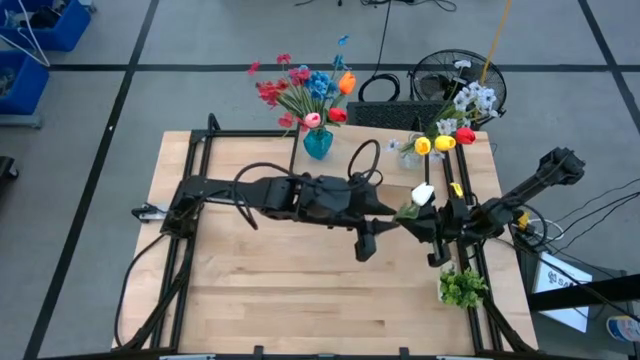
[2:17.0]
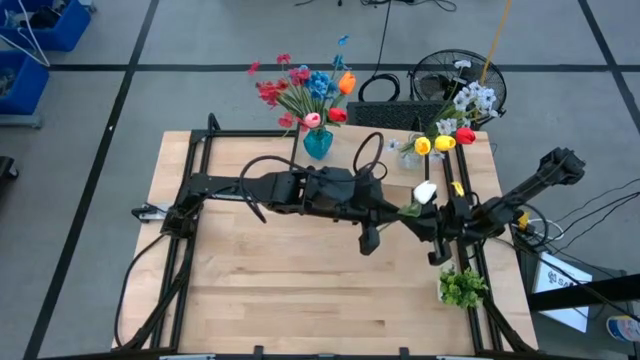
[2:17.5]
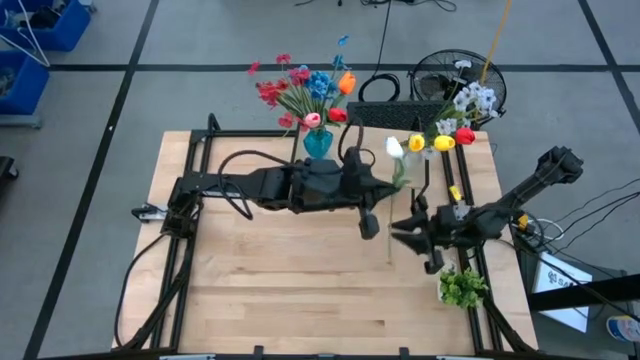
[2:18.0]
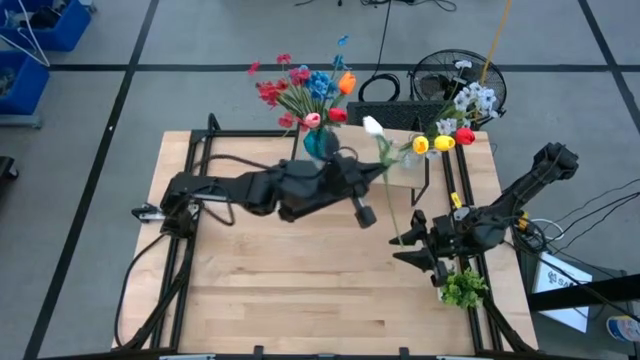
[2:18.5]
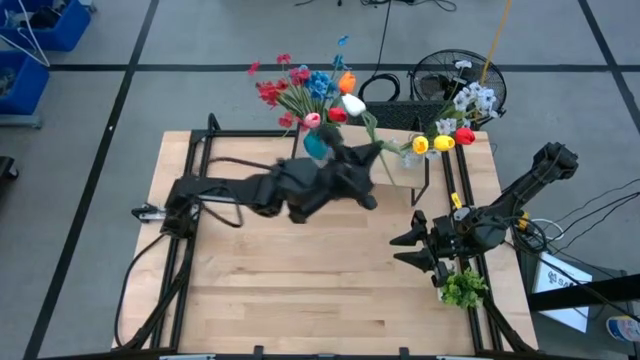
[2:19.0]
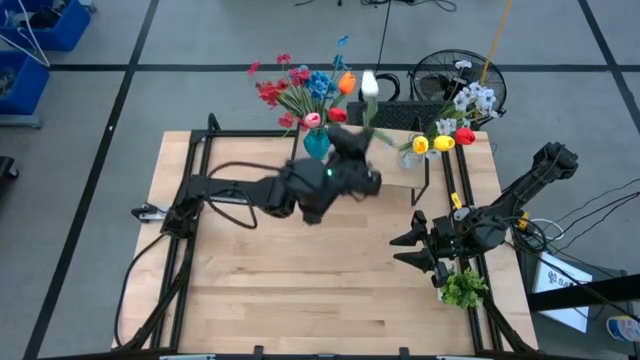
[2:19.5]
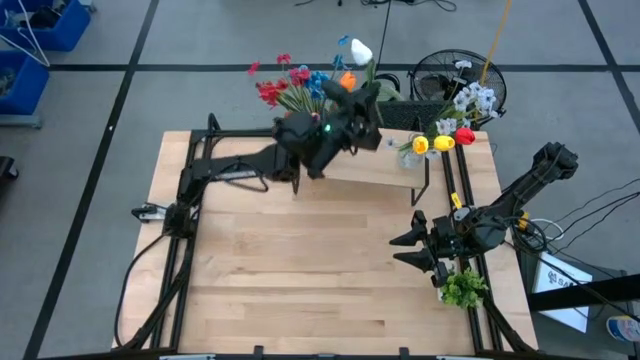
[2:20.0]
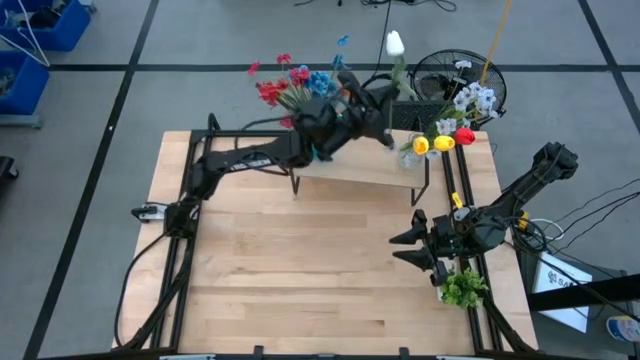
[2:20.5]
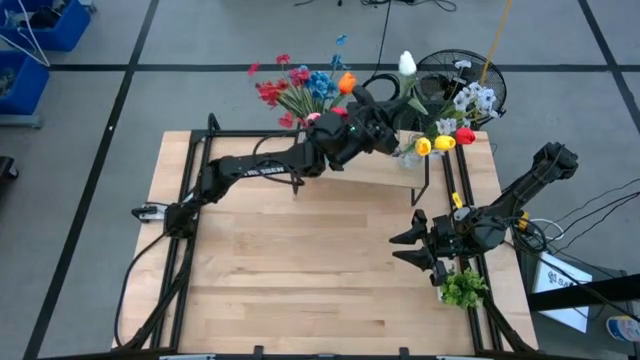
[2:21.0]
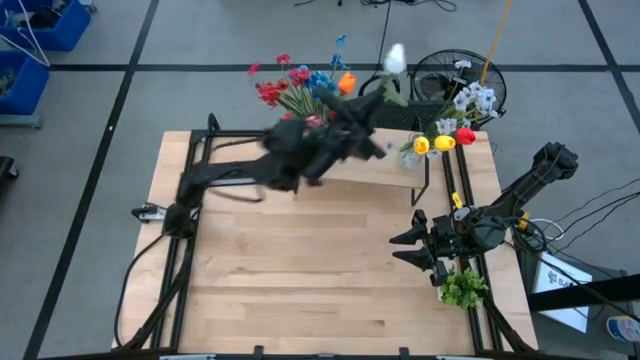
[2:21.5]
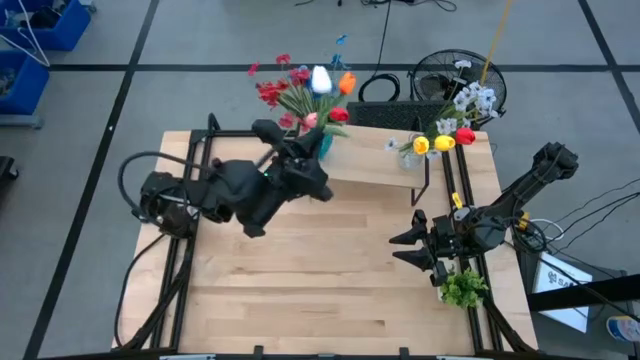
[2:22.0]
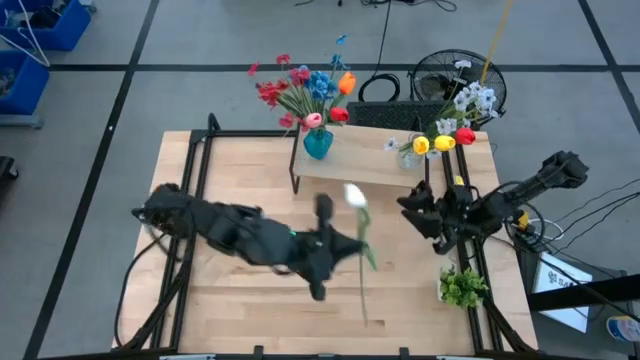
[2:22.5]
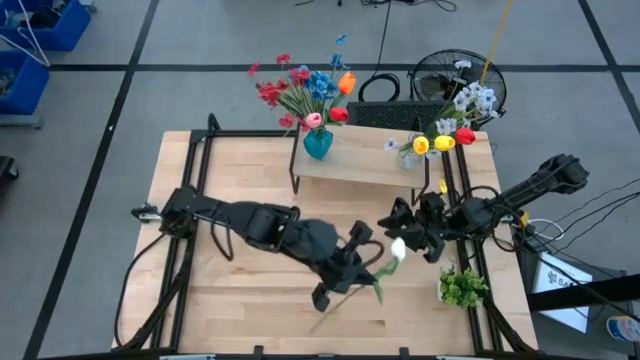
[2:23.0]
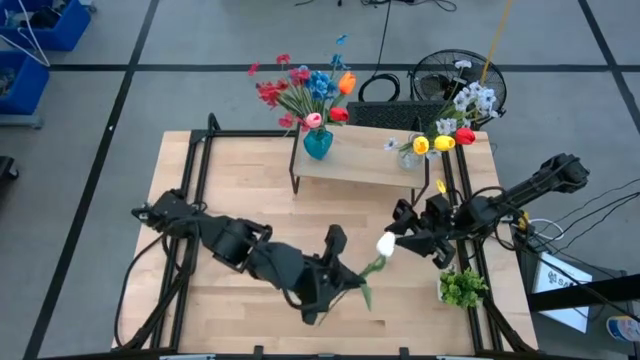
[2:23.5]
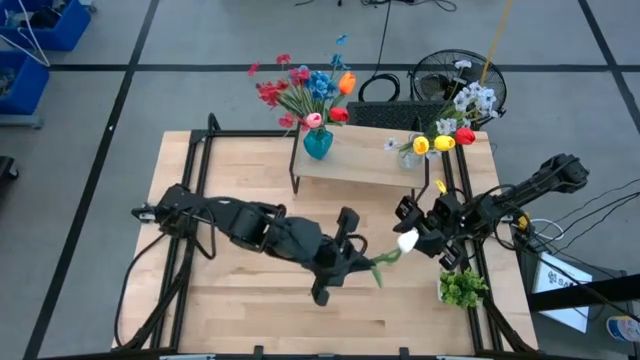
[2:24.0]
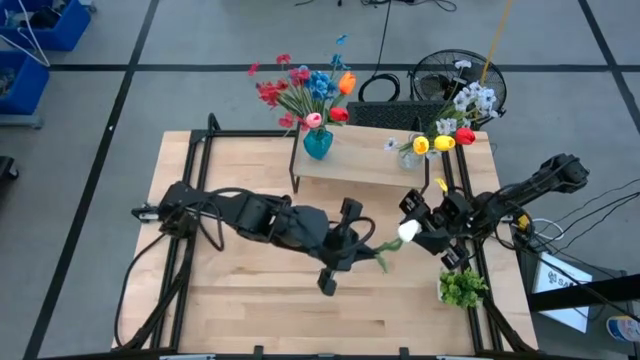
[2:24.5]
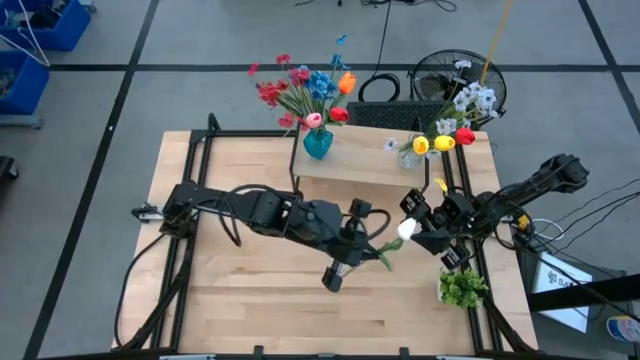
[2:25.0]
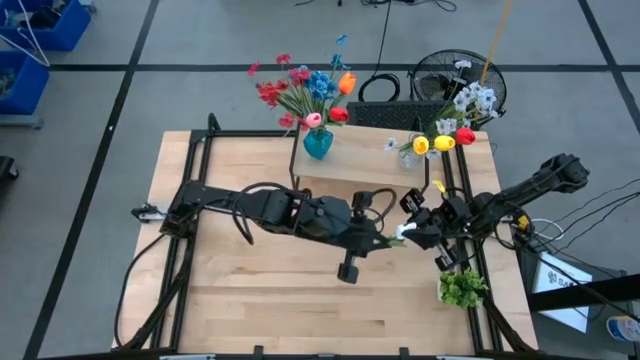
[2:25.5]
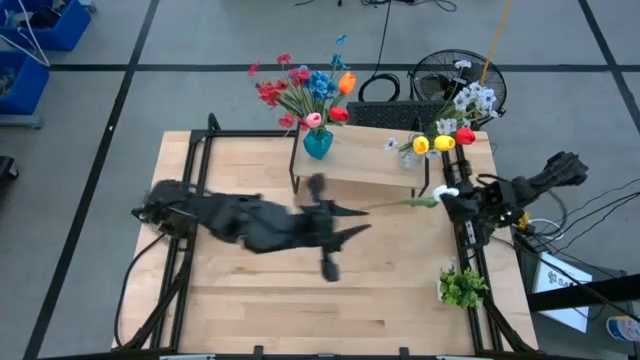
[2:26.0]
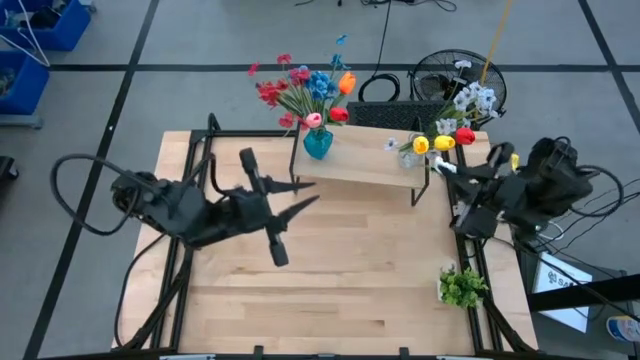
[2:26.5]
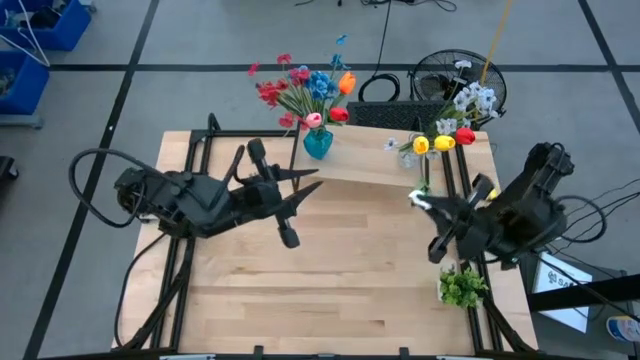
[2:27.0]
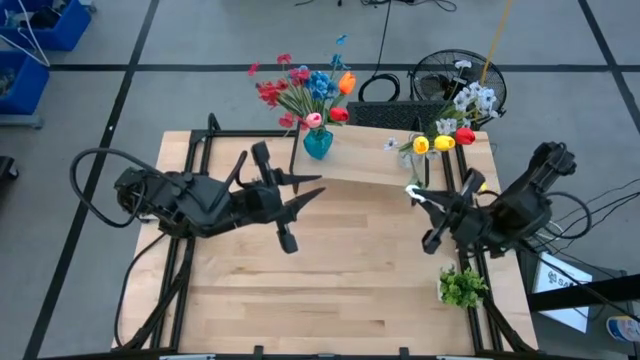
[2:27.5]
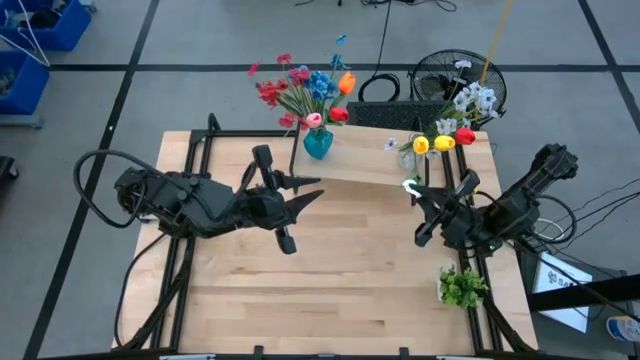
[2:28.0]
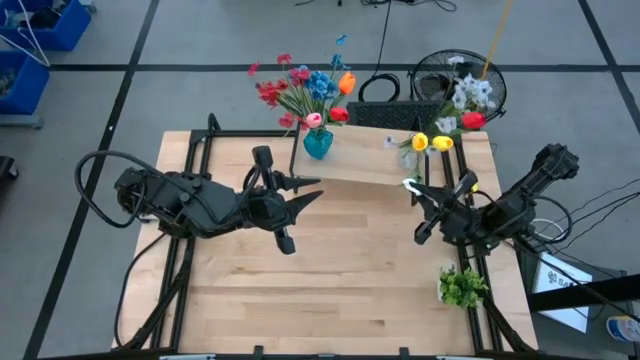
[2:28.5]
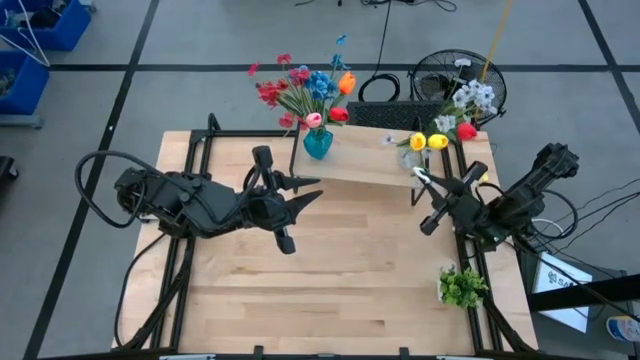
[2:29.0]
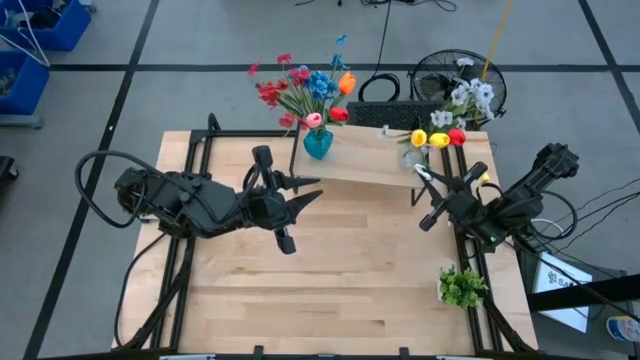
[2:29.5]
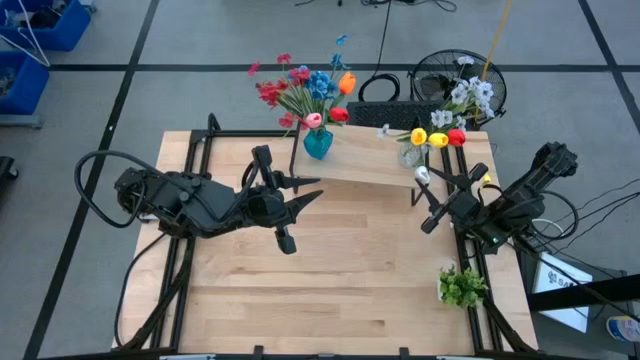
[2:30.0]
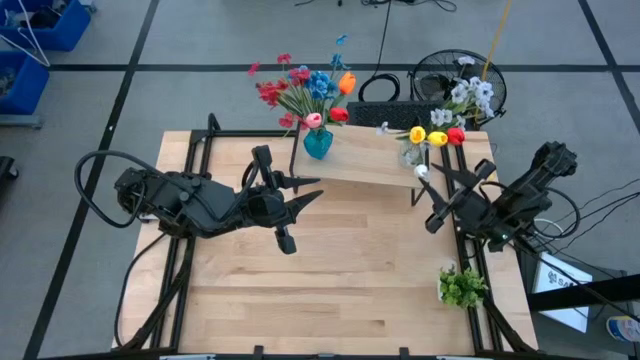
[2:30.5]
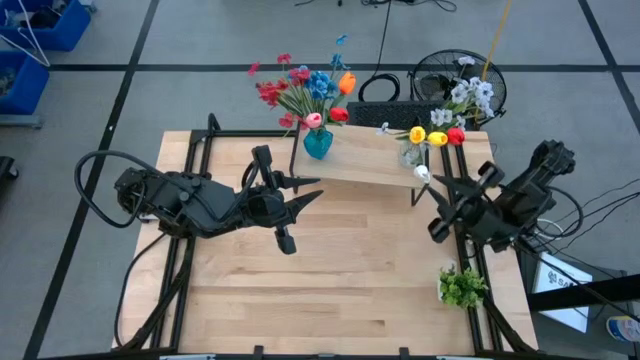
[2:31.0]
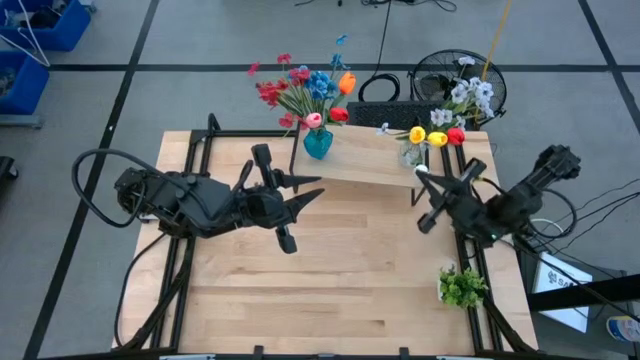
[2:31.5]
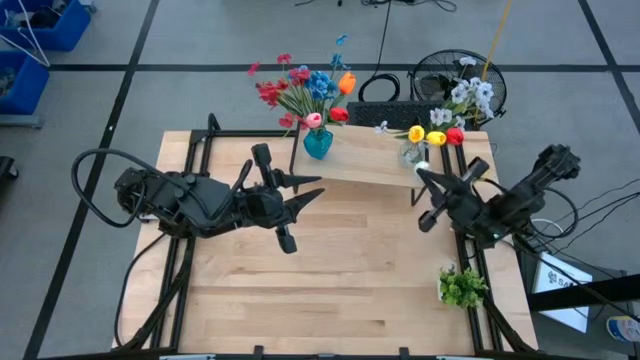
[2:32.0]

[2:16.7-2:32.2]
Task: Pick and place flowers into a vace then onto a shelf
Put the white tulip into the transparent vase

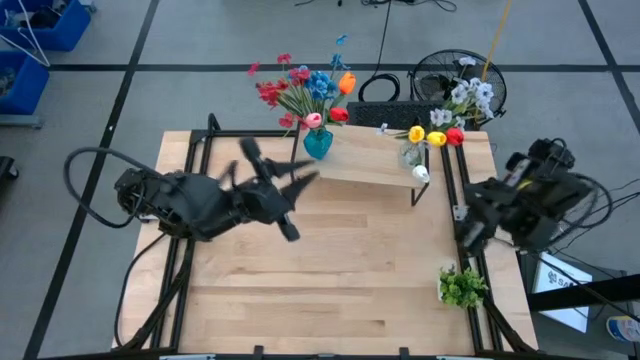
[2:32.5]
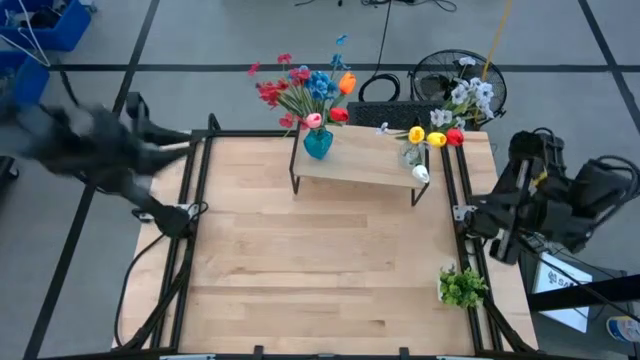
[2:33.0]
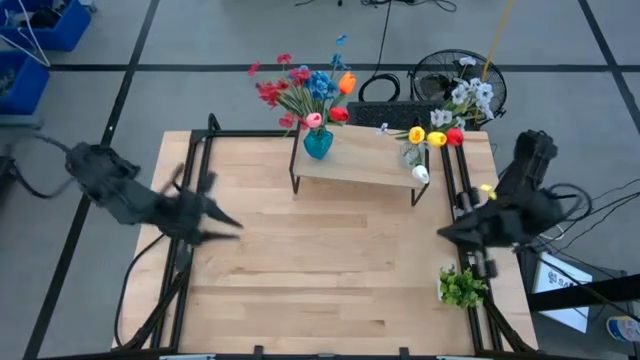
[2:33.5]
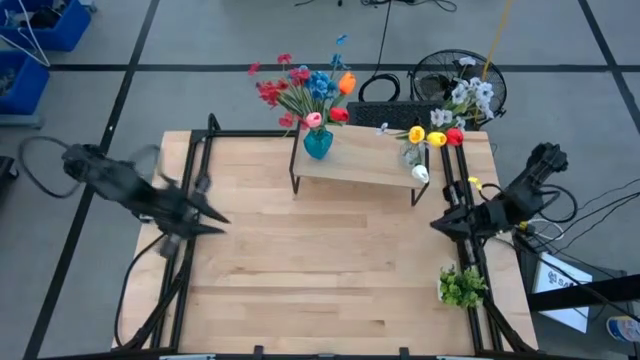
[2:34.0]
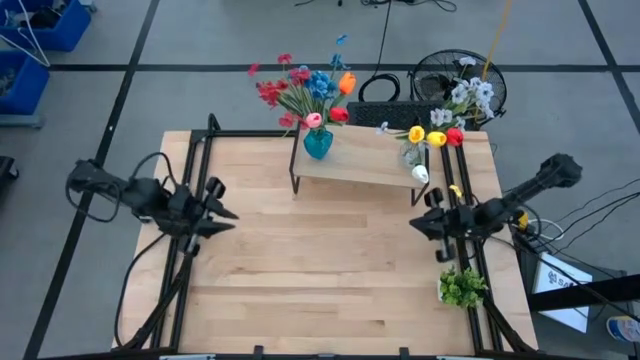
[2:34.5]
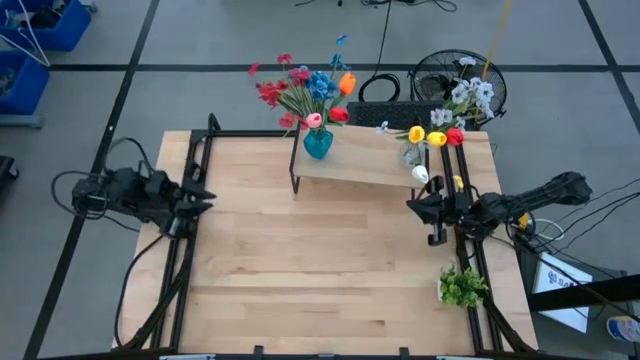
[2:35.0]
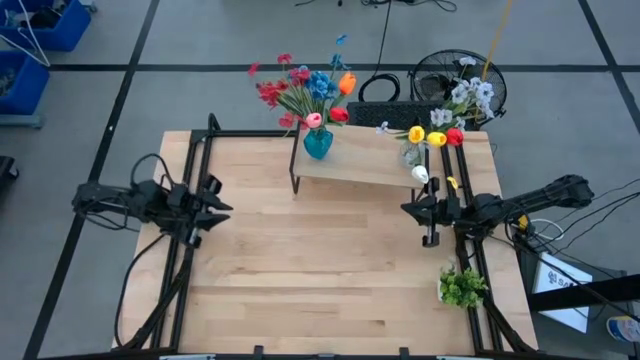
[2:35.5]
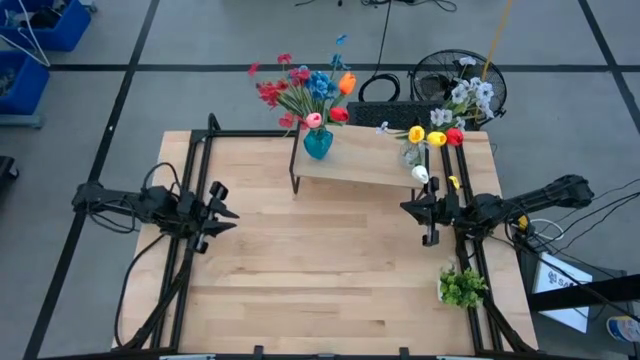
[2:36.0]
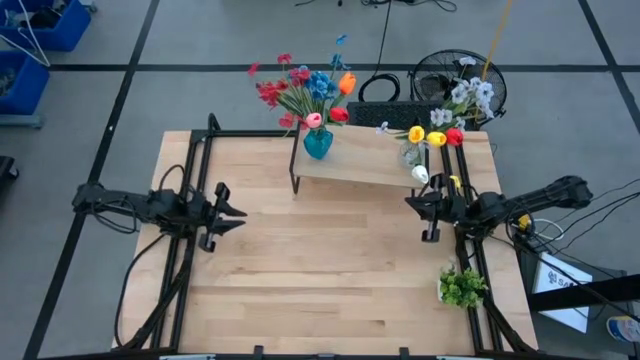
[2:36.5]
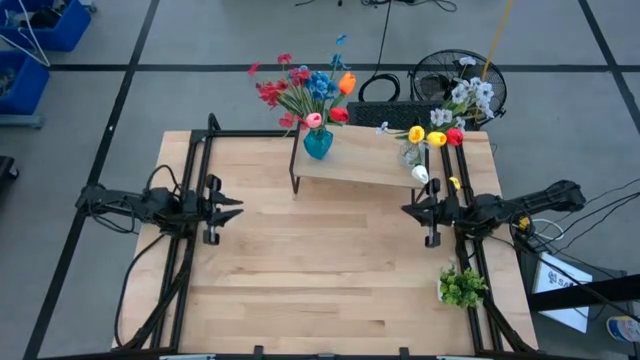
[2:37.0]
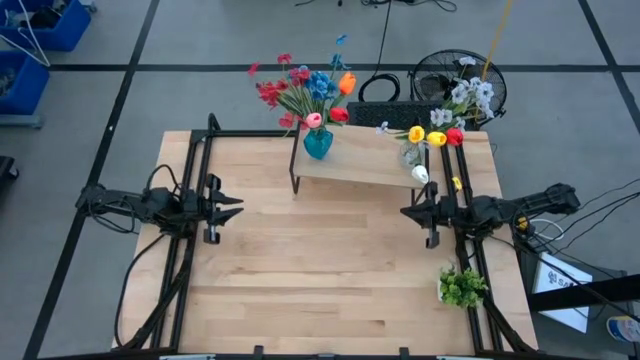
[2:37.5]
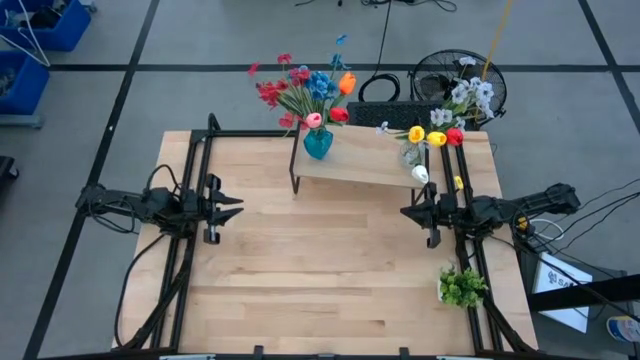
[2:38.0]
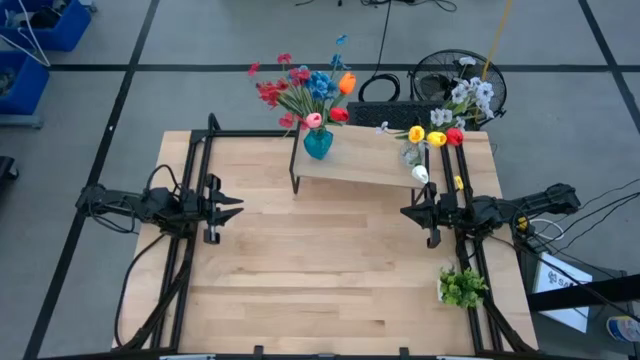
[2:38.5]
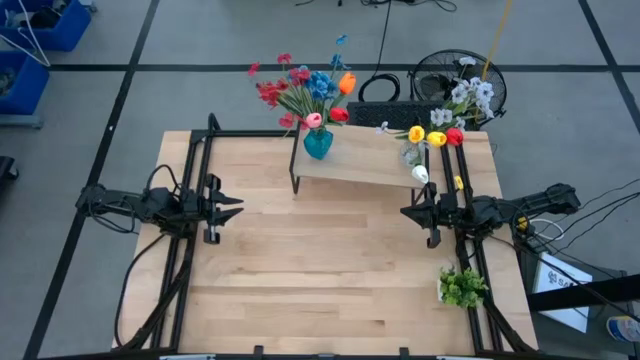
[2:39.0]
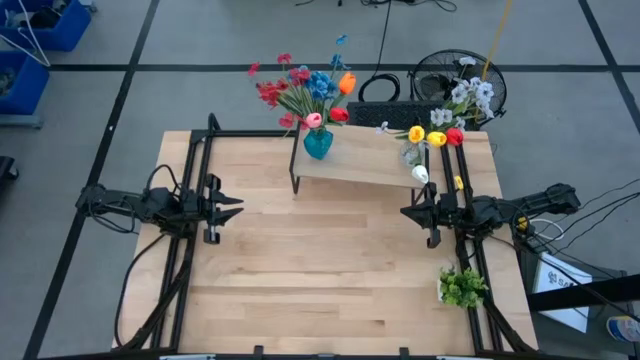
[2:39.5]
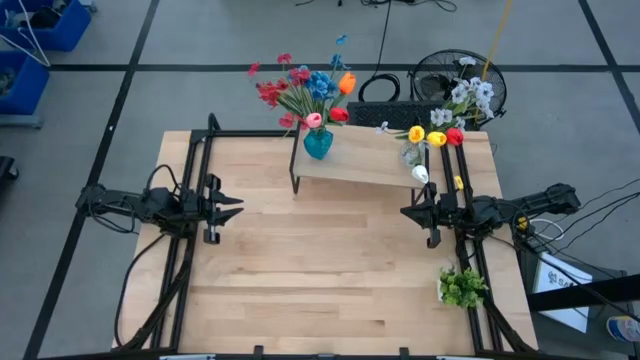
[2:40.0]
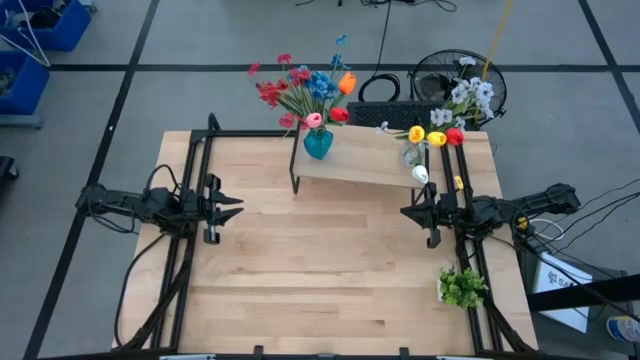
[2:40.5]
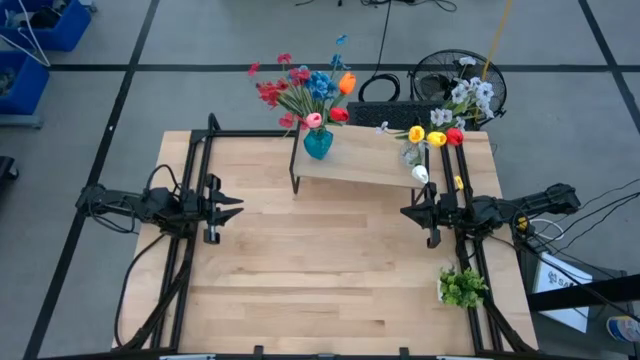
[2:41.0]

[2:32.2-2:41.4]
Return to Home Position
